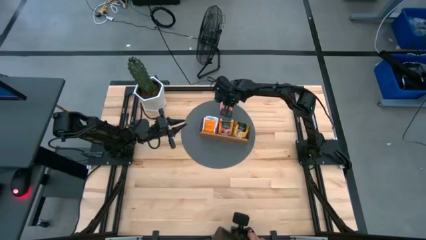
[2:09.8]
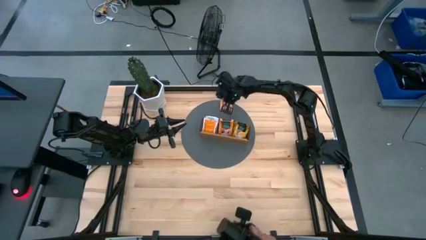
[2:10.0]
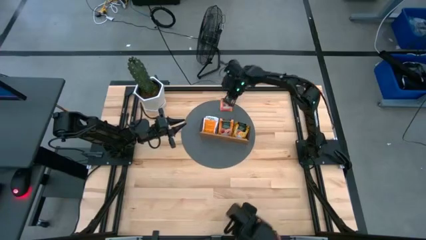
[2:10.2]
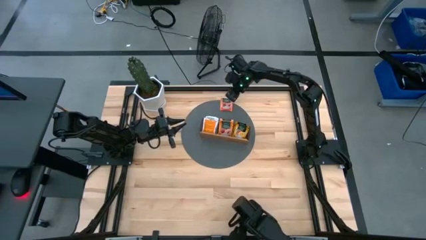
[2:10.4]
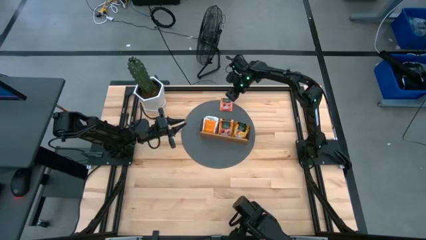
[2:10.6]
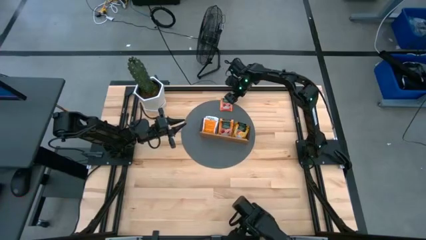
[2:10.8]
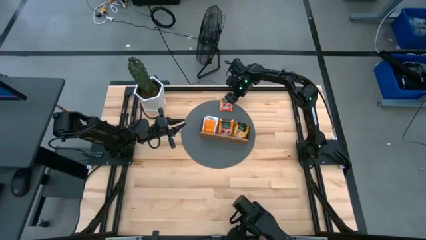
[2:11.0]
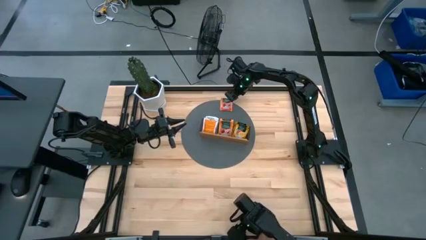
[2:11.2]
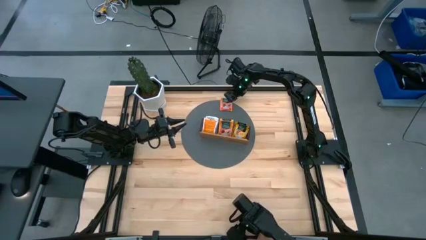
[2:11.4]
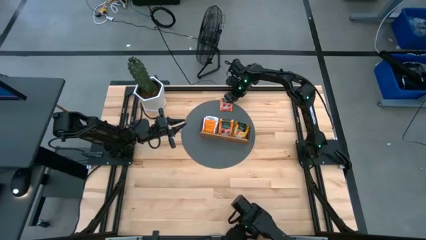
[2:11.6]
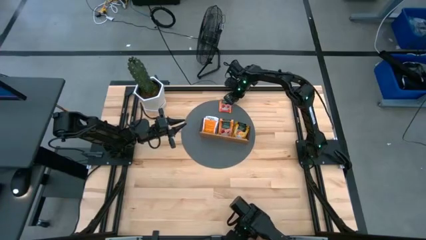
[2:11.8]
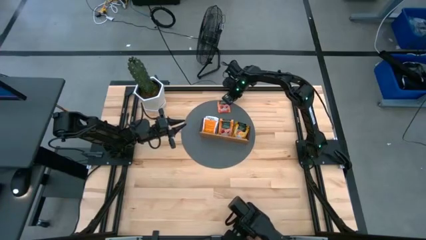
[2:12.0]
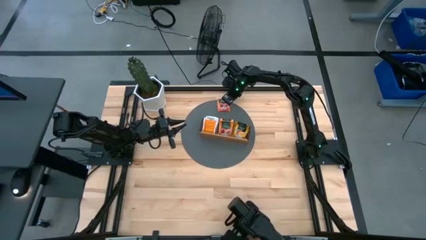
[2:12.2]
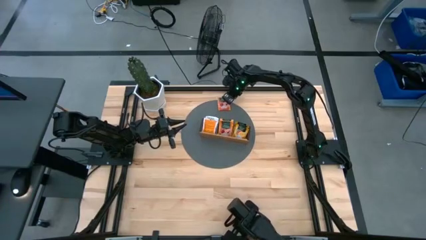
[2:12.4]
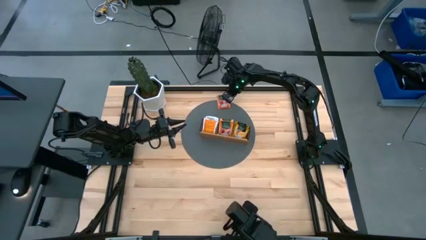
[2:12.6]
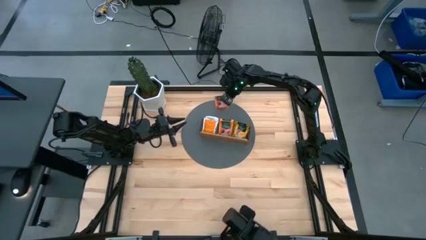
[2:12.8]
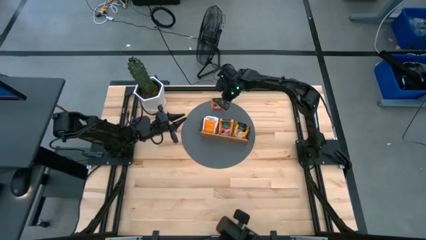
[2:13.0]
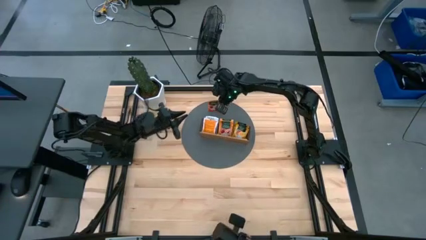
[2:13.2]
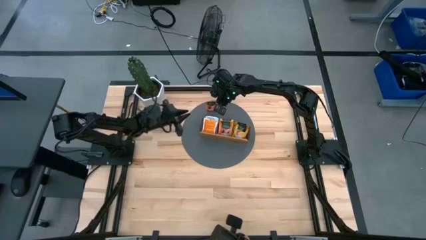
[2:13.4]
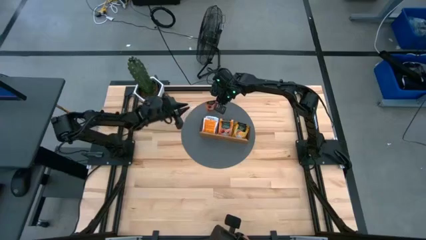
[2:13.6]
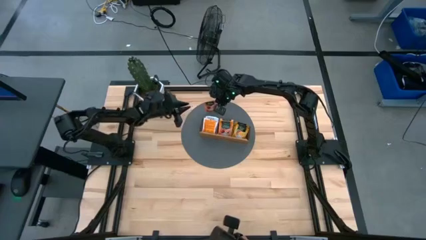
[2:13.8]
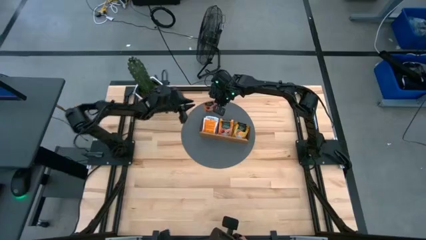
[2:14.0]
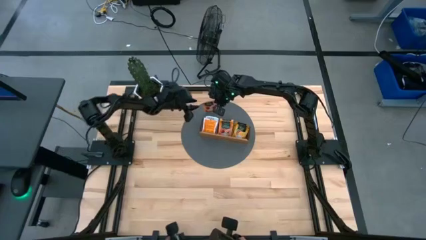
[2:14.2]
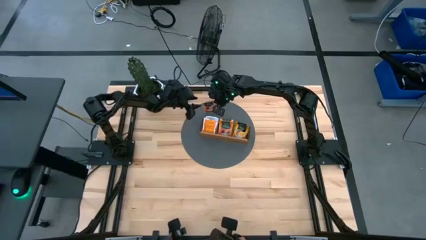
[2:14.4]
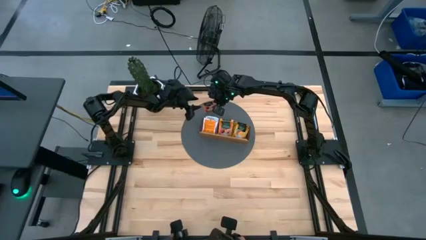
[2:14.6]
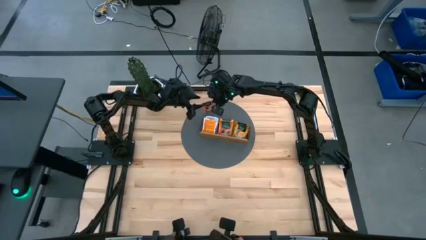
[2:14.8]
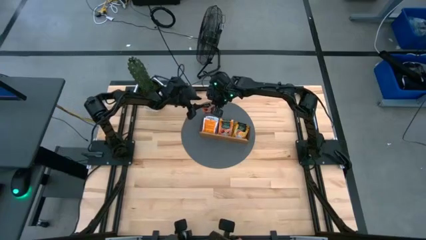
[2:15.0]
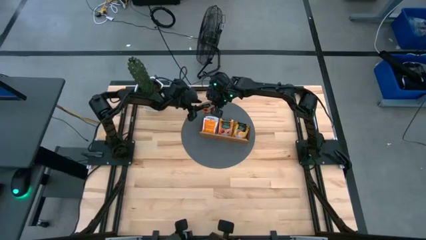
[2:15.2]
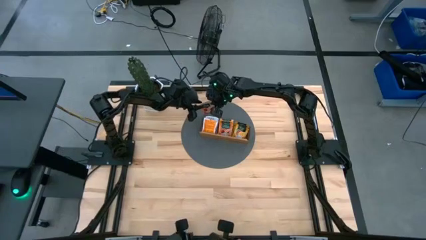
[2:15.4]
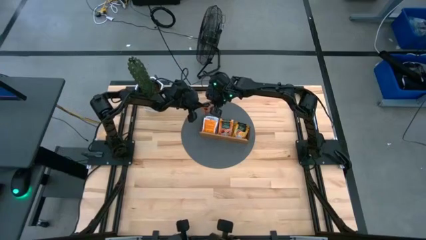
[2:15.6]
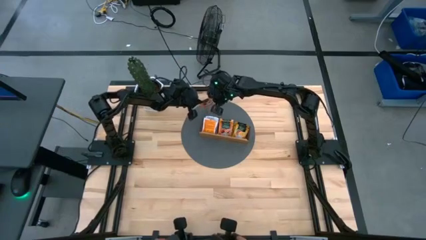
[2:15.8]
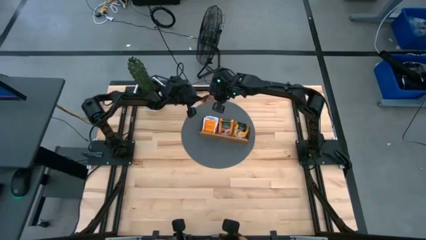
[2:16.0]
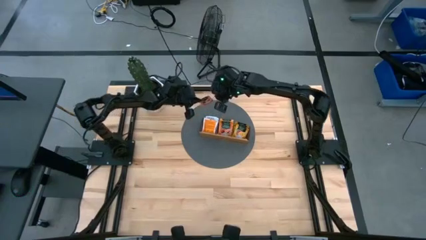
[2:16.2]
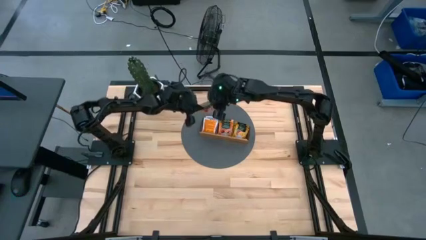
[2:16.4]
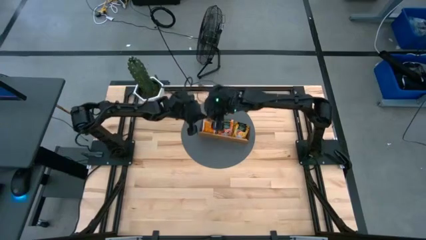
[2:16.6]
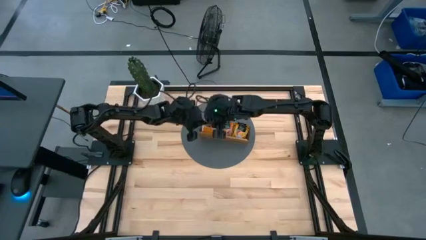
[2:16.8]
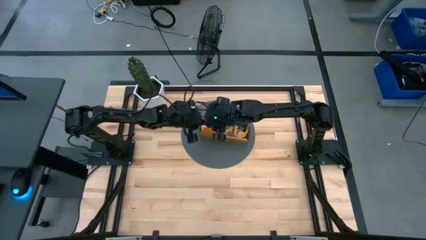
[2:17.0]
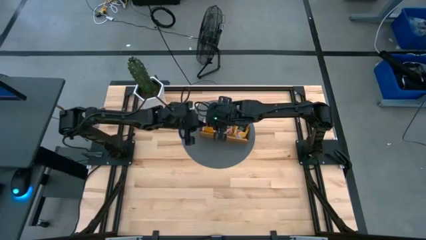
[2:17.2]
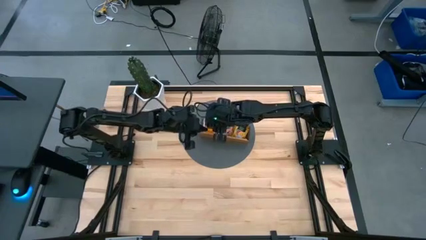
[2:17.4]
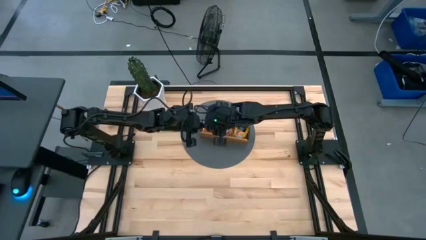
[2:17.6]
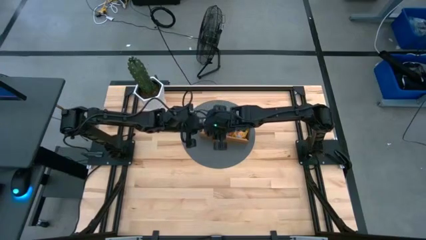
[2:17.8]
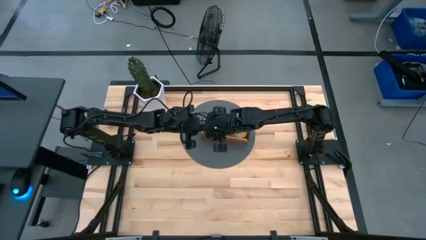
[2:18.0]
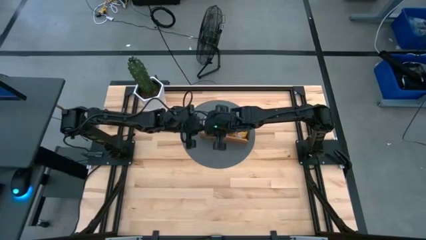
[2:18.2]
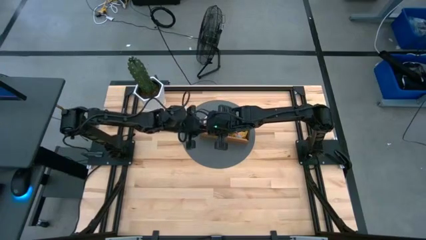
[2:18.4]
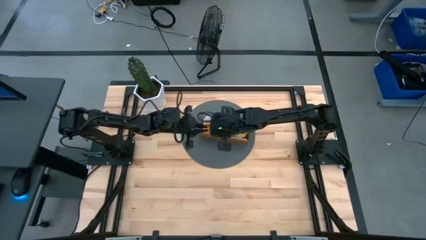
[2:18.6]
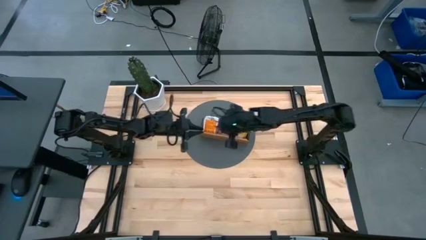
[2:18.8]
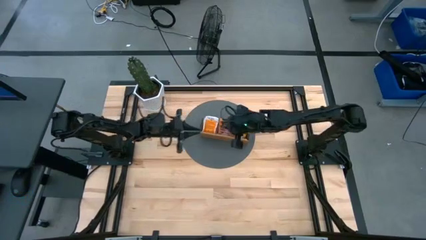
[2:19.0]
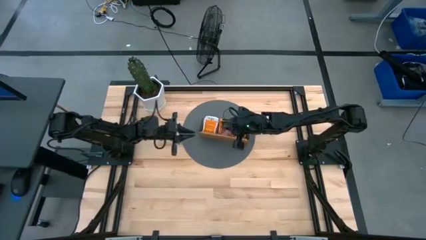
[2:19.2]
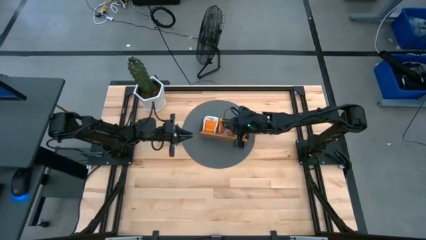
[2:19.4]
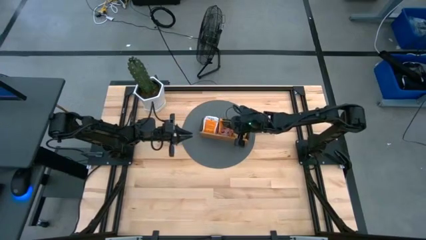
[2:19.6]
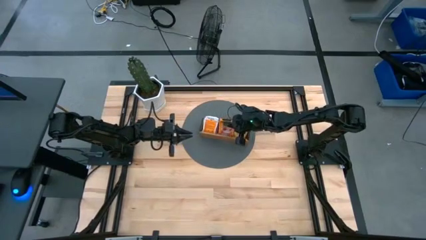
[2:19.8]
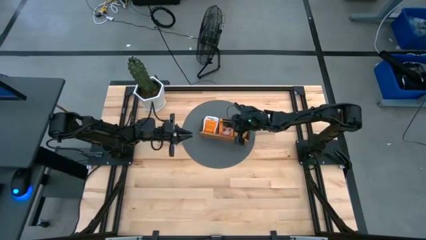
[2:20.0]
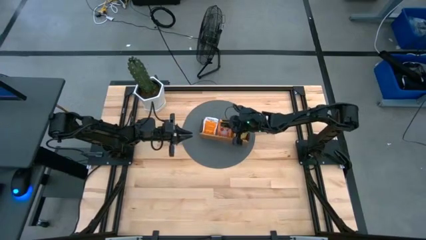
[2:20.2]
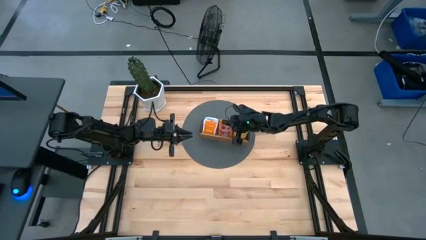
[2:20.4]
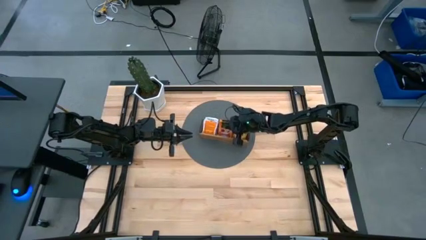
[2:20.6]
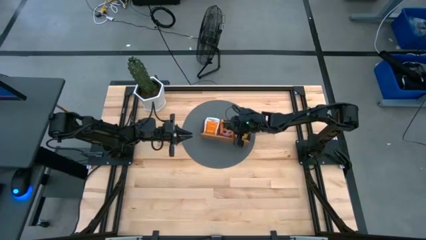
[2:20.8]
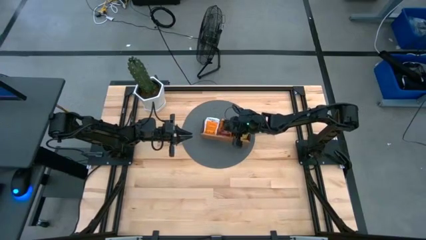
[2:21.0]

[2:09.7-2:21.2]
Task: Pick & Place Tea
Put the orange tea bag into the middle section of the wooden organizer

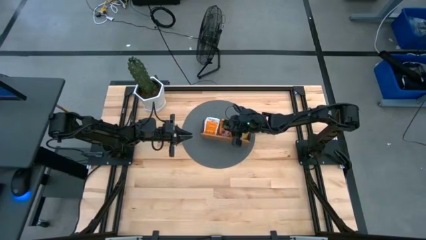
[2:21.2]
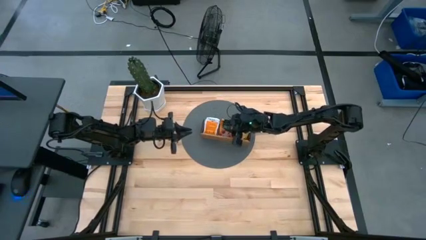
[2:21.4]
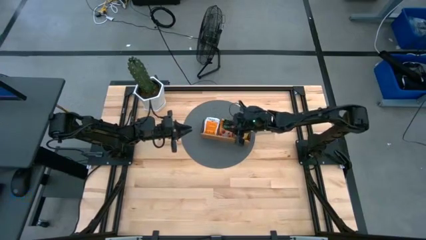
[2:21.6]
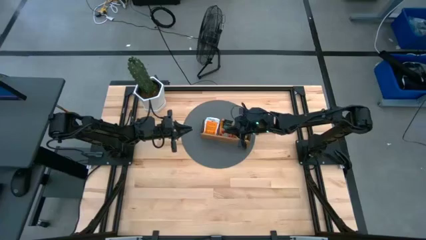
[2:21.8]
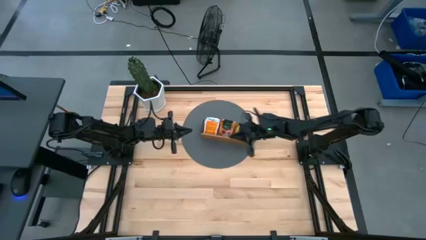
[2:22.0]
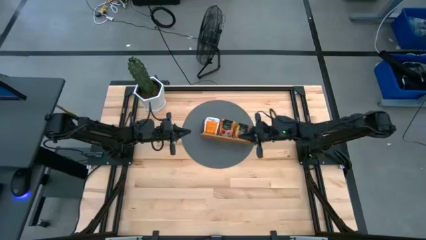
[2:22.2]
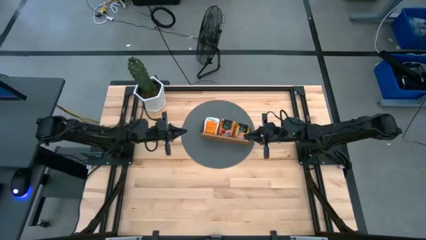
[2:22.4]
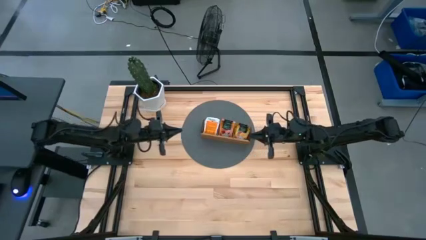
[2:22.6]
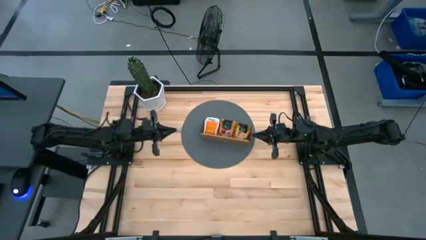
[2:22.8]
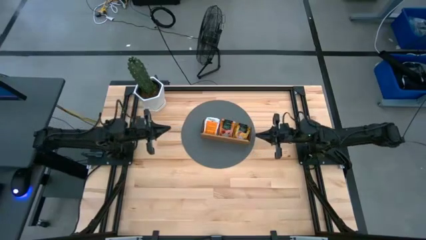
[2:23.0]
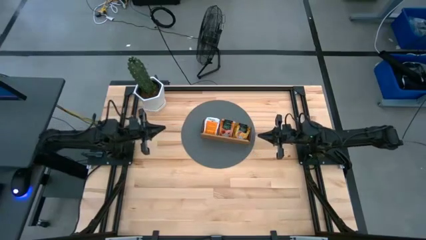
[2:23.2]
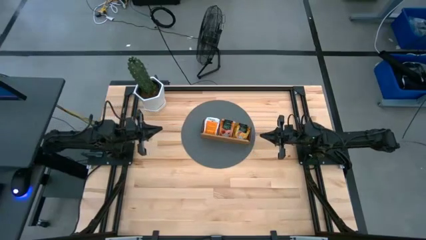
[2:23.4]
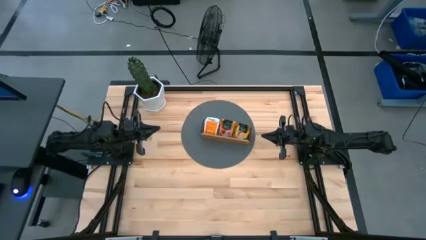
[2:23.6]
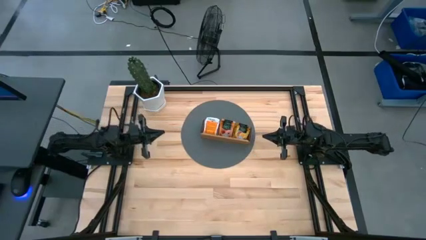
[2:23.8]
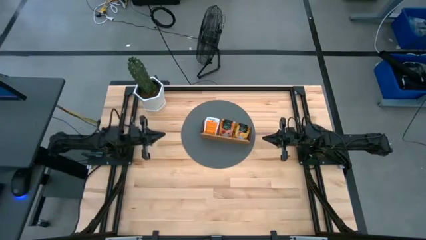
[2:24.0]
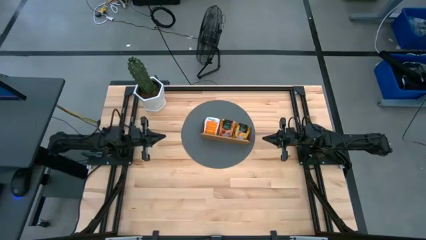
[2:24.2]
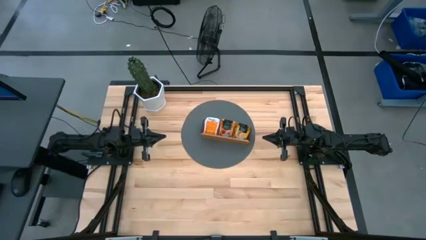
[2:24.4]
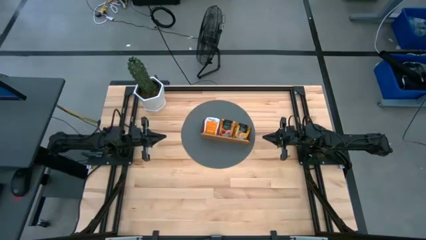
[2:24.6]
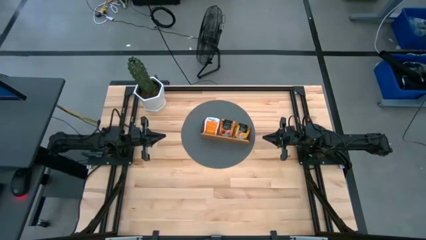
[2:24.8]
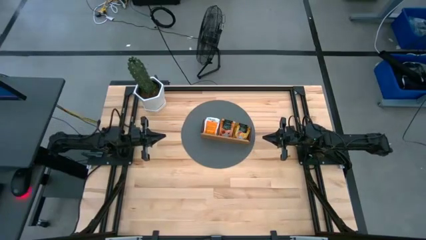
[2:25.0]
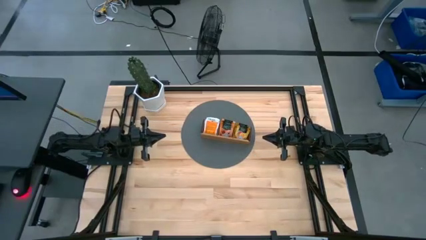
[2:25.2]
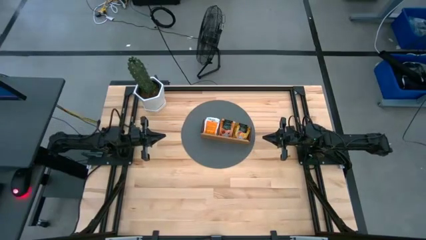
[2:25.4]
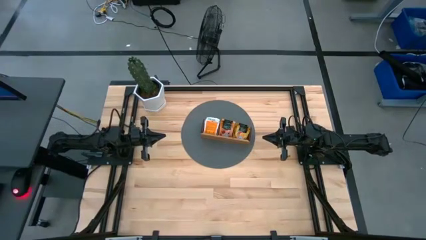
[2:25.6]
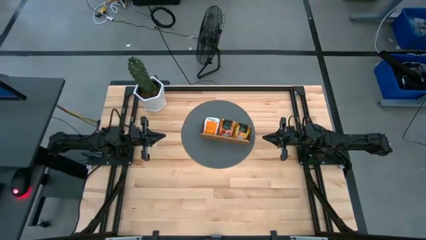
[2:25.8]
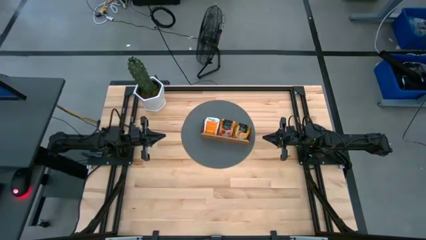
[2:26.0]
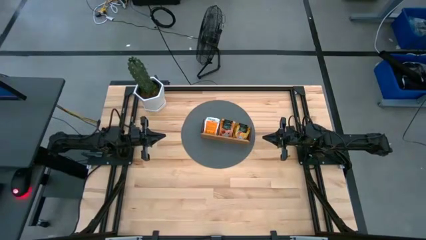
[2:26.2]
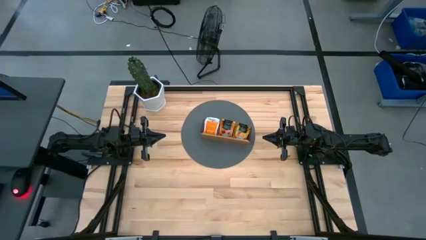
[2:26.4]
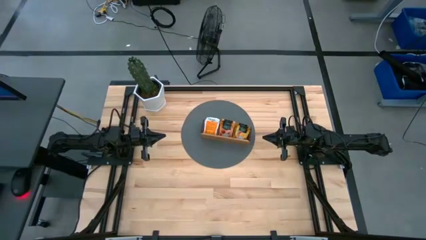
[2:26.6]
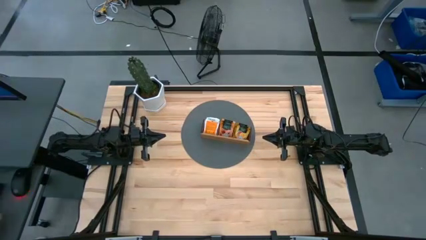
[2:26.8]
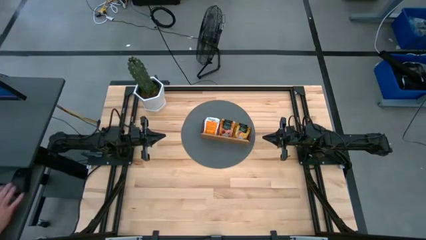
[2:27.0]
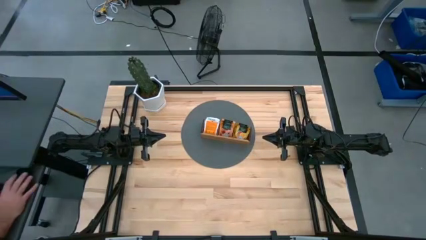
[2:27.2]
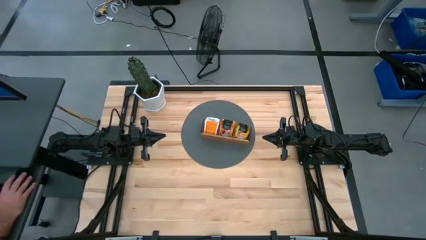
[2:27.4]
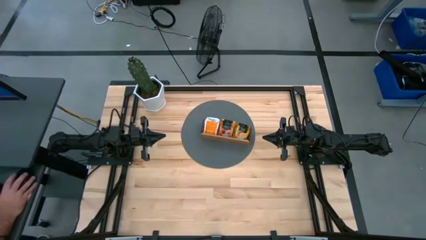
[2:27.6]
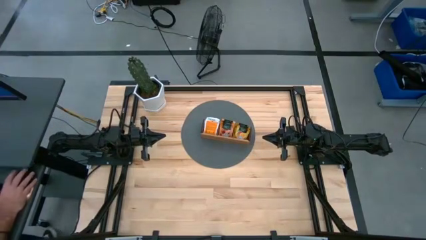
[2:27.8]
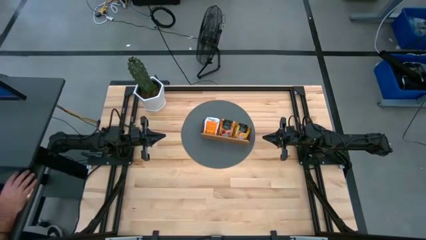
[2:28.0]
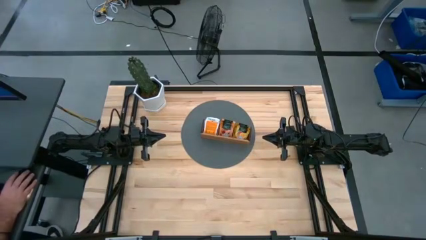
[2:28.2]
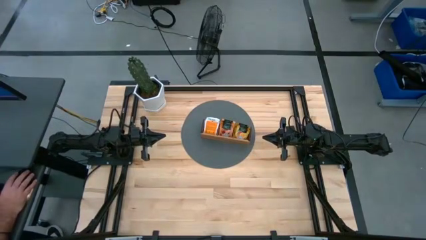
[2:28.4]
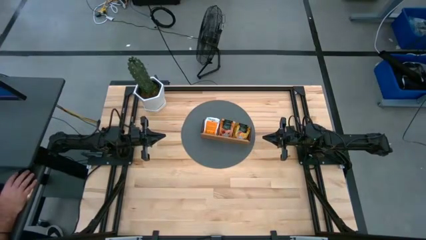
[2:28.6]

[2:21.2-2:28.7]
Return to Home Position
